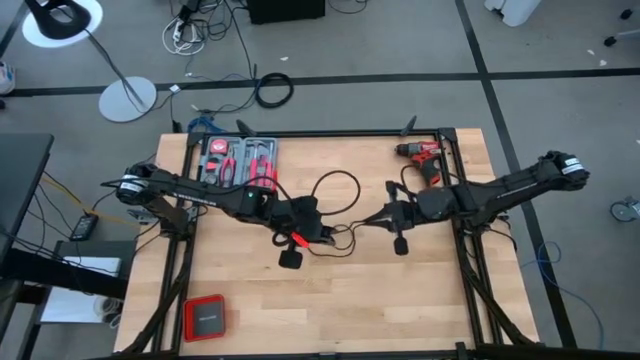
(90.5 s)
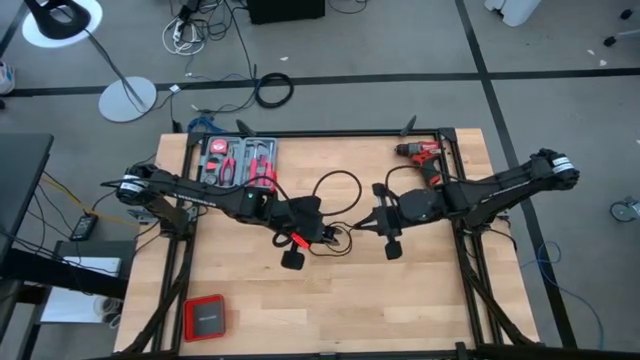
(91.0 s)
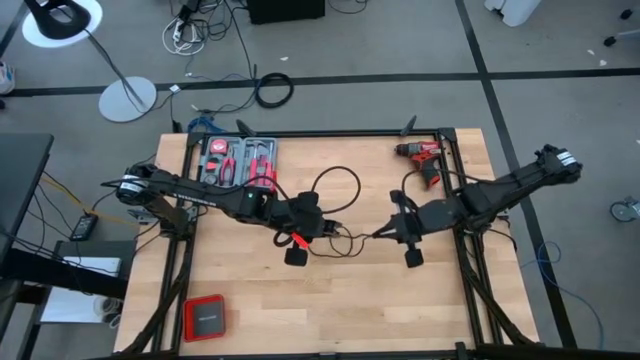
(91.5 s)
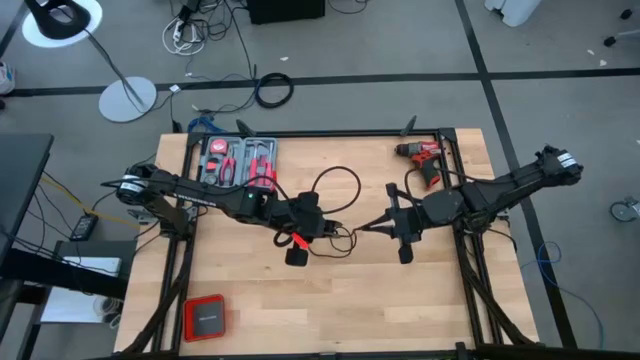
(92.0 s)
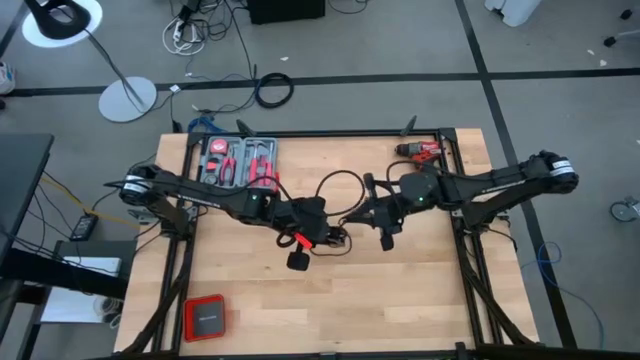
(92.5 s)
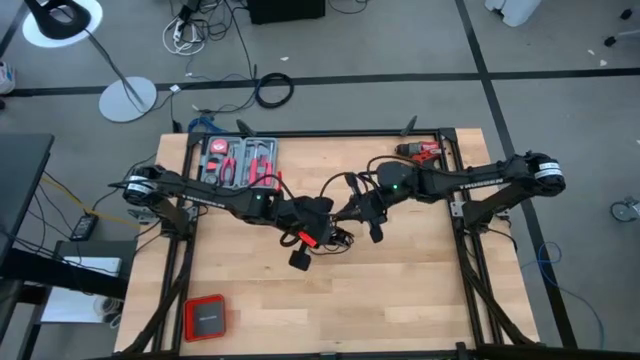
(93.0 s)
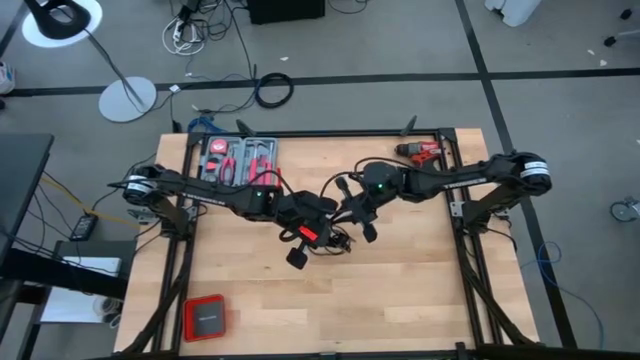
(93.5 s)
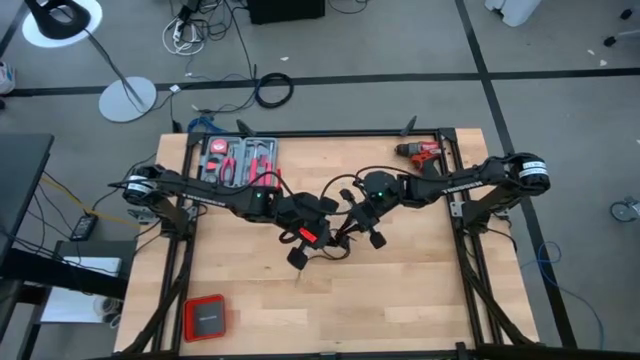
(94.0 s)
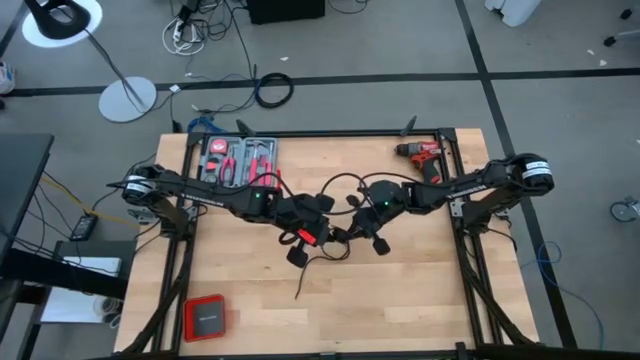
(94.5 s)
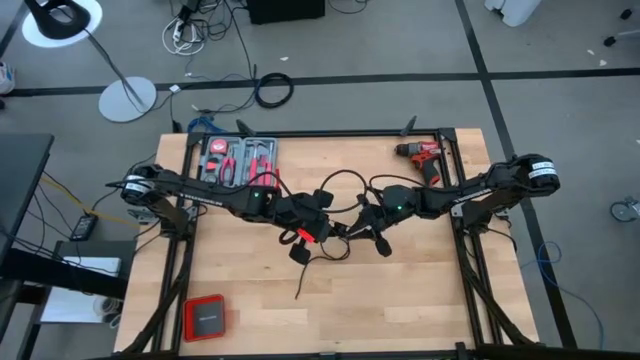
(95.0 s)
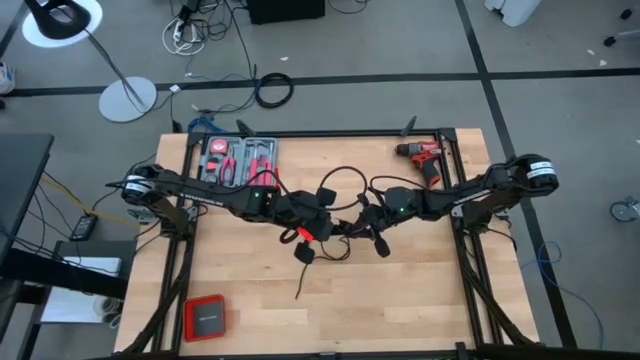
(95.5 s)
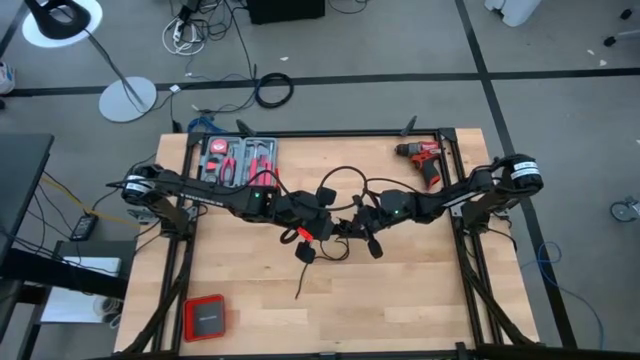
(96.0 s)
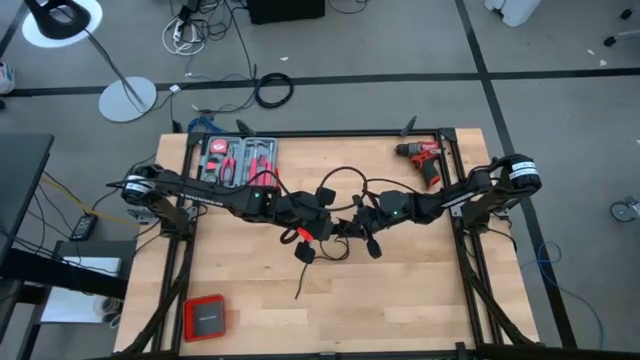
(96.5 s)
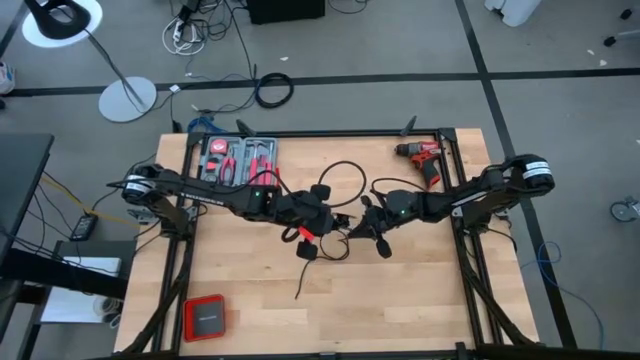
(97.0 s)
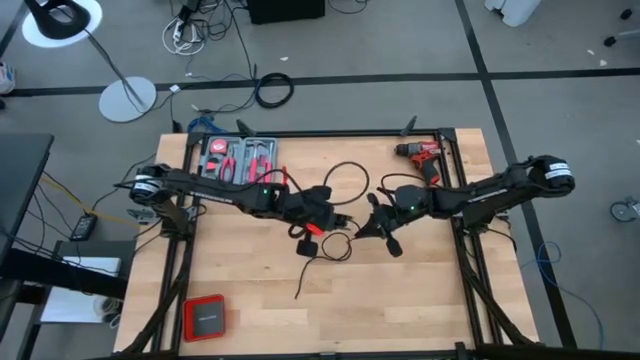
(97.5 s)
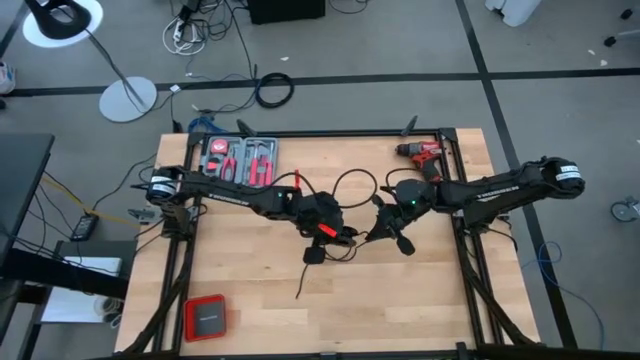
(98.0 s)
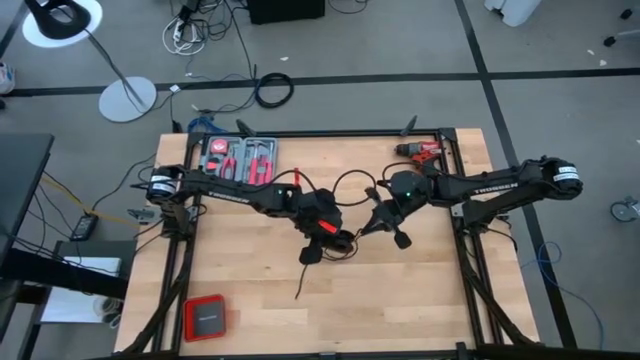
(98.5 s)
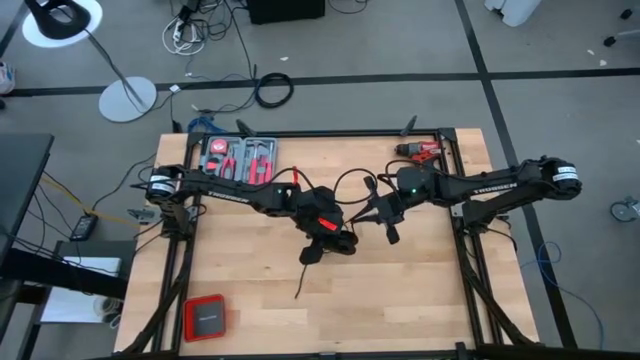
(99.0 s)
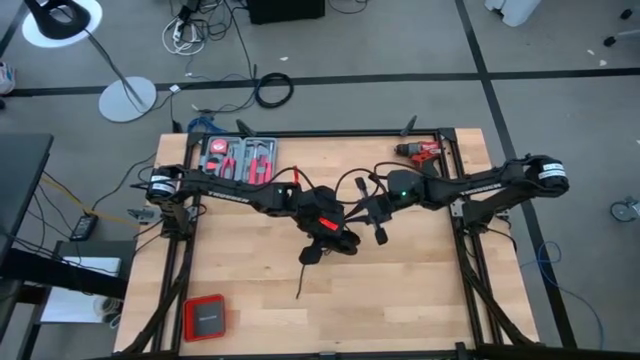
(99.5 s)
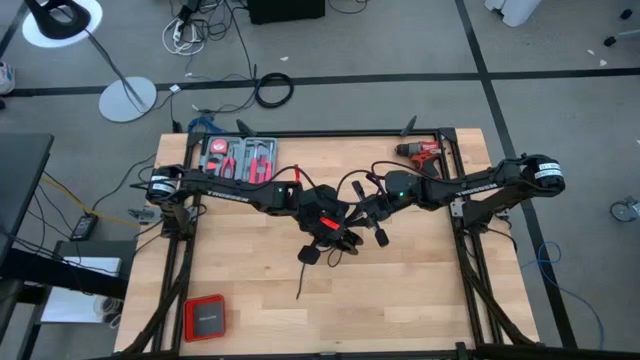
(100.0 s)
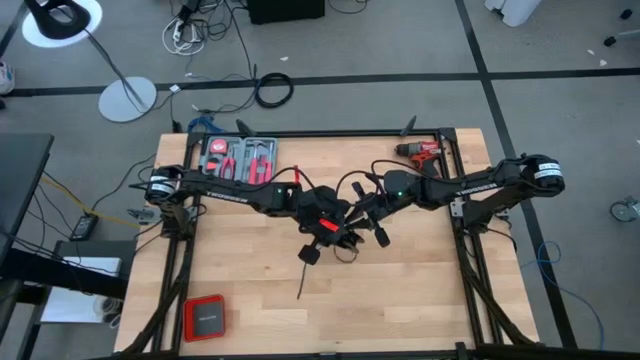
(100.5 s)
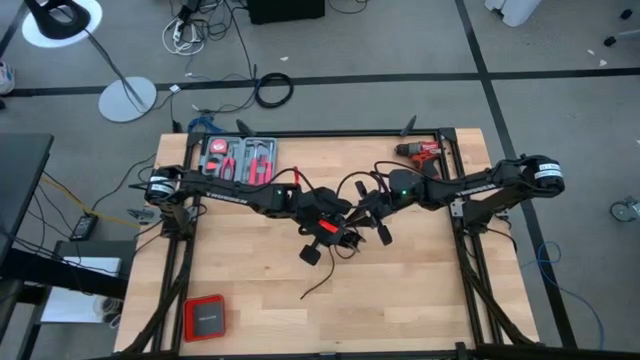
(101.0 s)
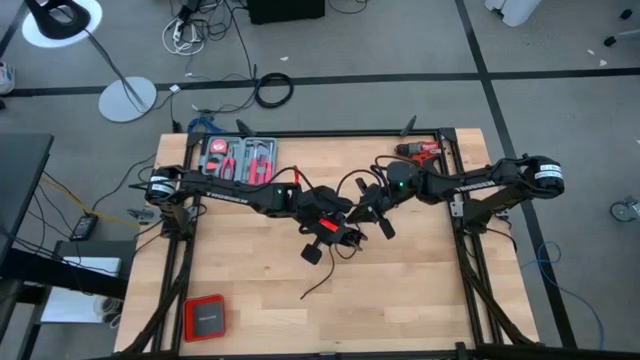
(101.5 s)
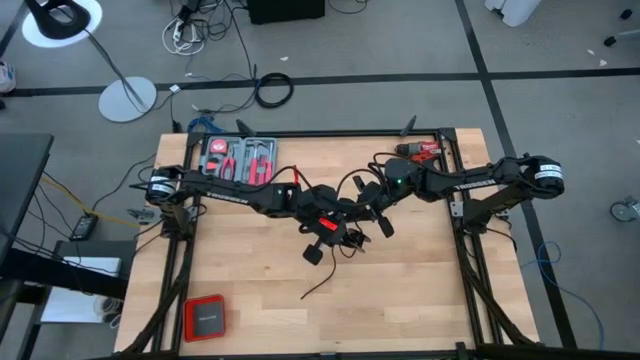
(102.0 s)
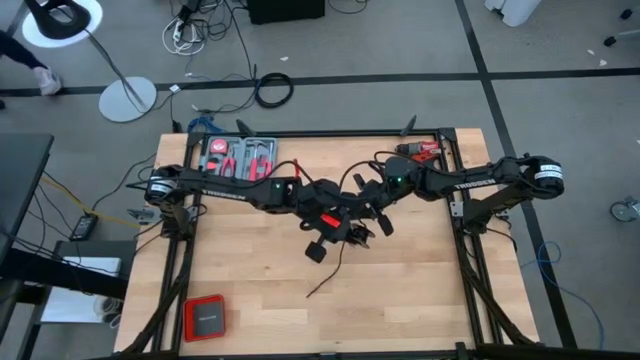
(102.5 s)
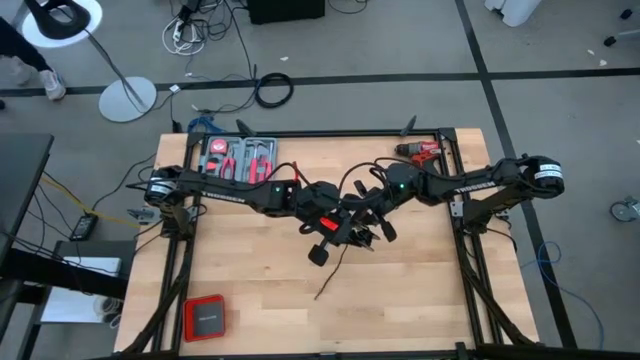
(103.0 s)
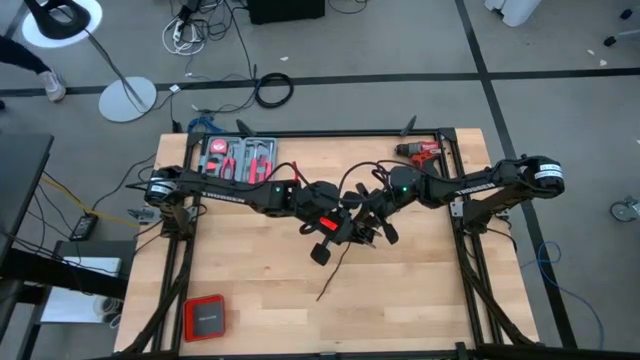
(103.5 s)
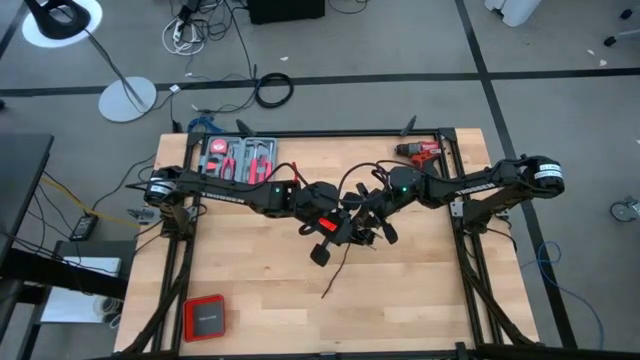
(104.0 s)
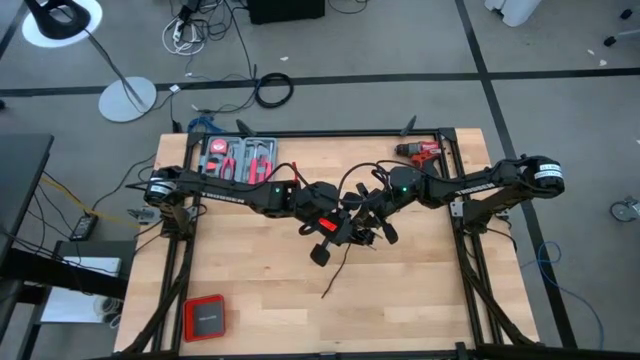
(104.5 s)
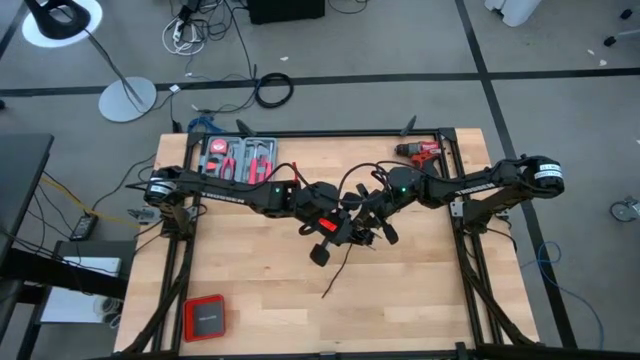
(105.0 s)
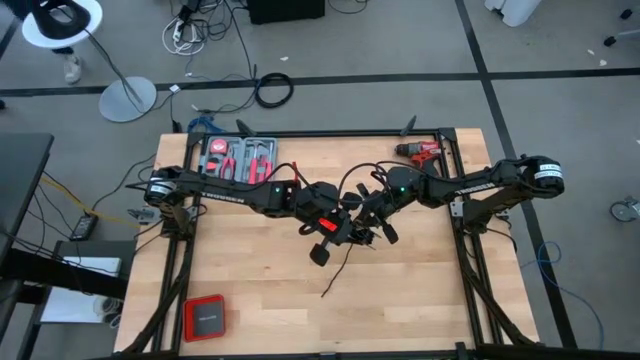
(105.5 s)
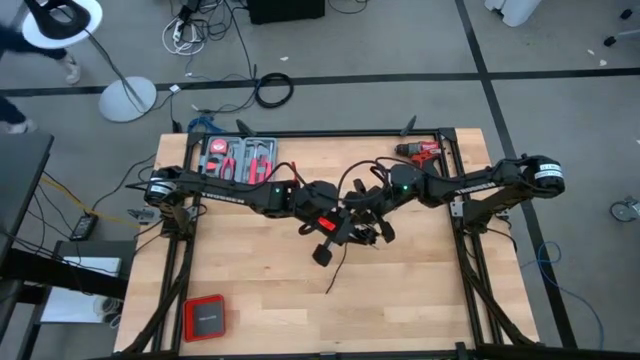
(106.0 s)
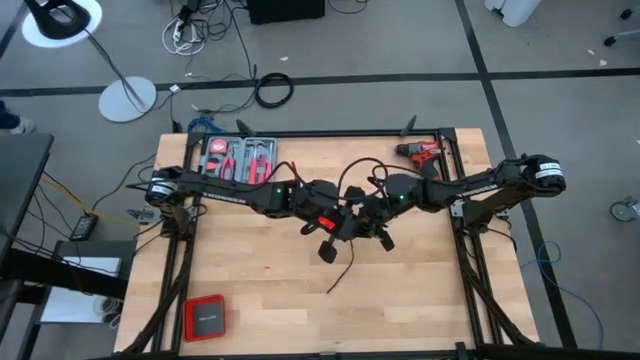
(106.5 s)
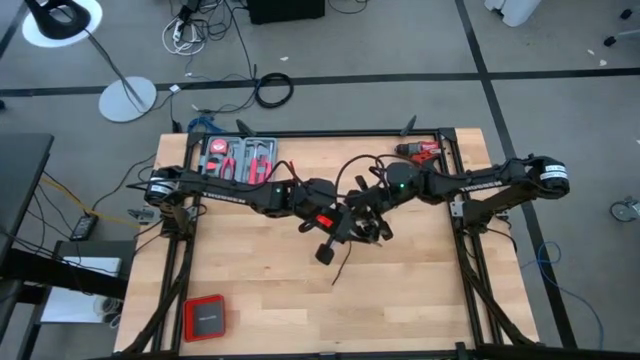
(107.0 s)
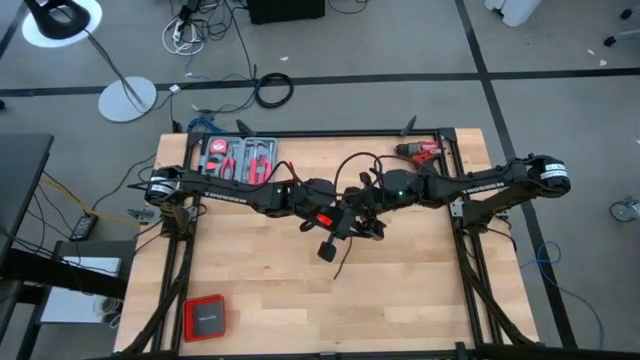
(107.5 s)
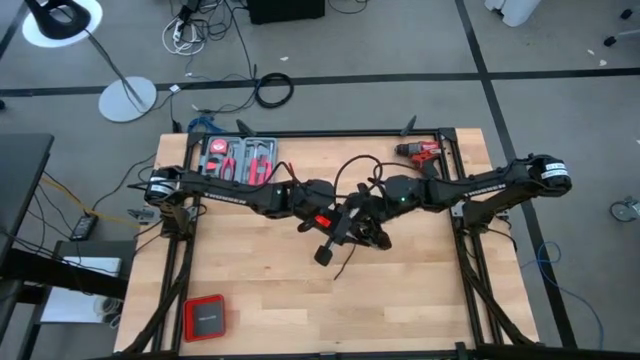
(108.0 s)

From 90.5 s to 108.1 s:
Task: Coil cords
Coil the black wire on the spool

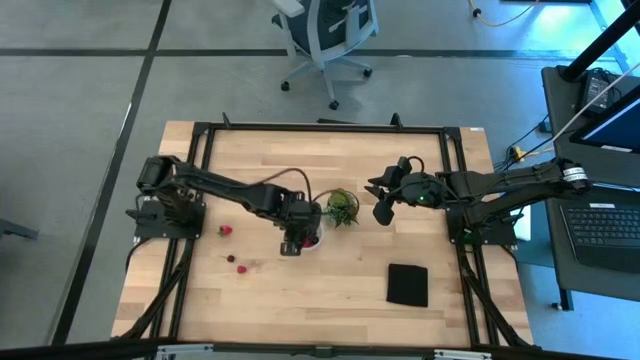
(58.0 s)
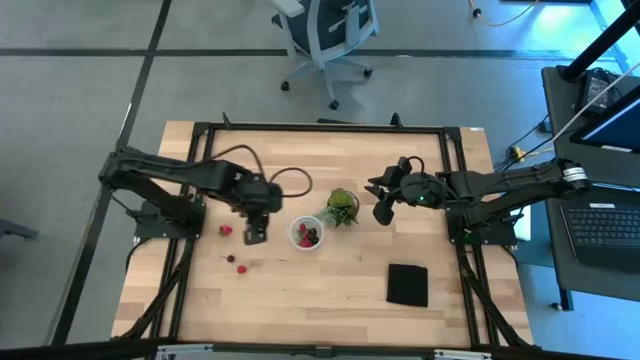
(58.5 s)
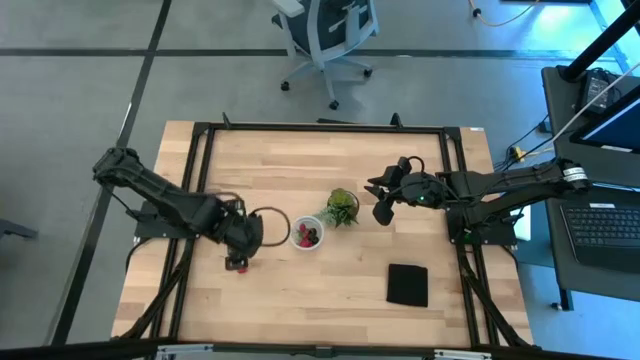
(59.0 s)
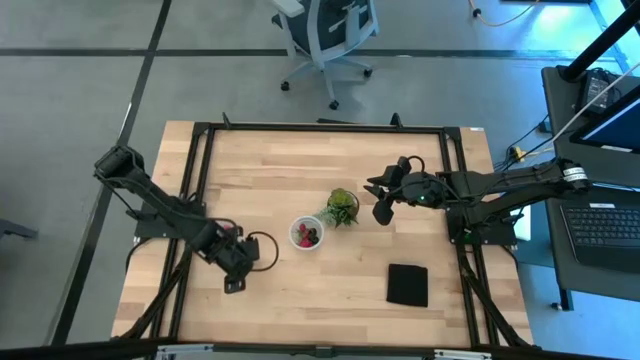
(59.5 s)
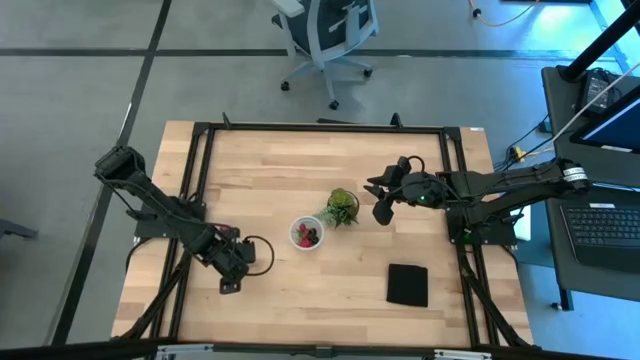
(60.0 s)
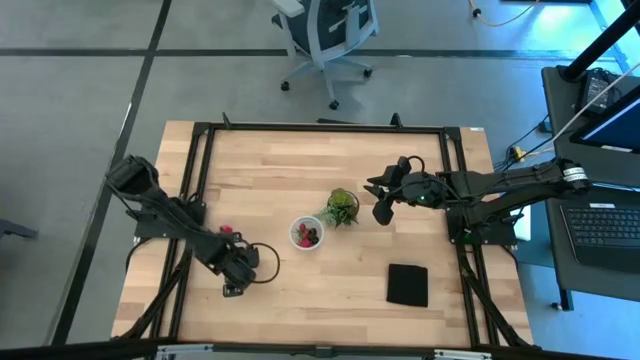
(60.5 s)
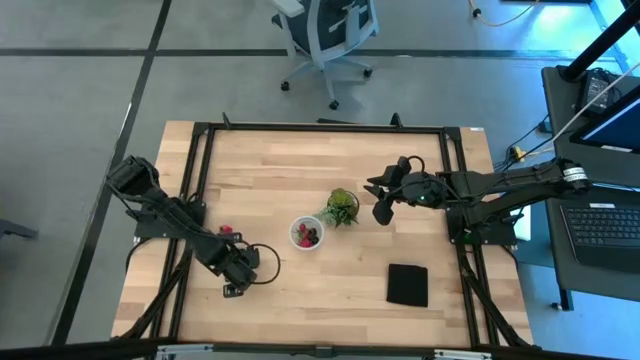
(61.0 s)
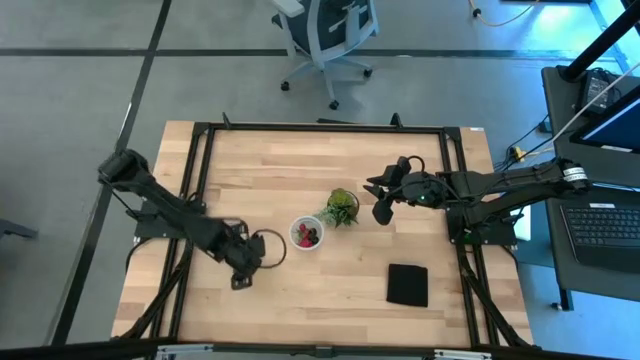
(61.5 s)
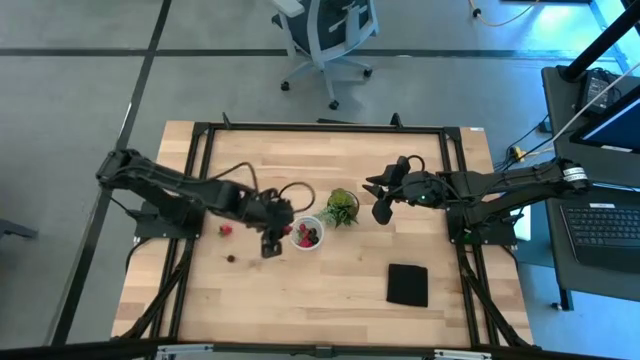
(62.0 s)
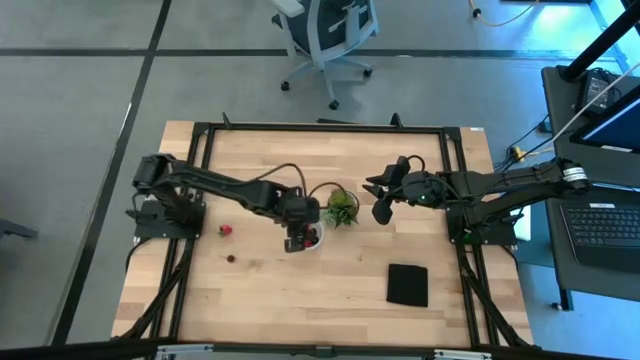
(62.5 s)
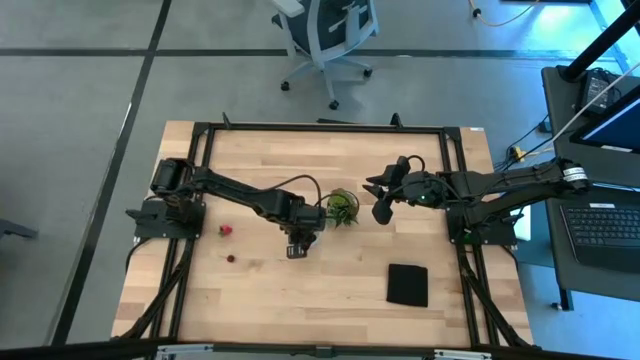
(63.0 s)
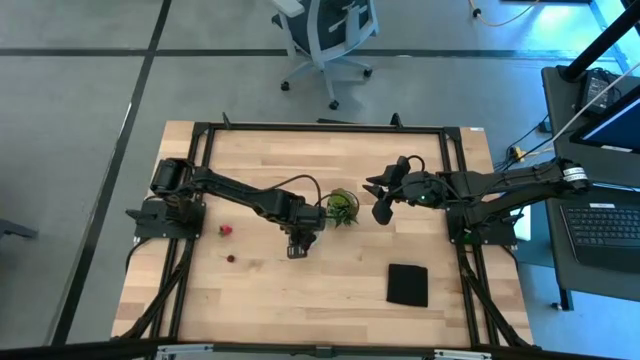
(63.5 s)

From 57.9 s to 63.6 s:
Task: Pick and placing Produce into tupperware
Put the bottom raspberry into the transparent container
